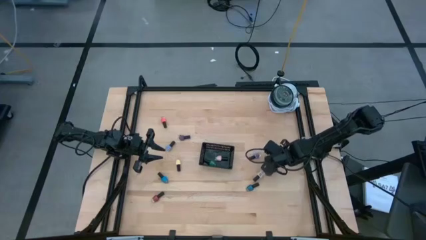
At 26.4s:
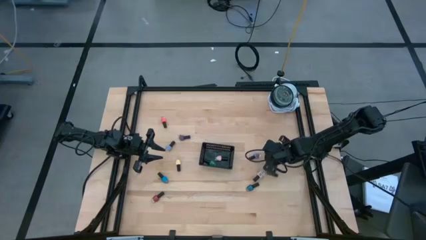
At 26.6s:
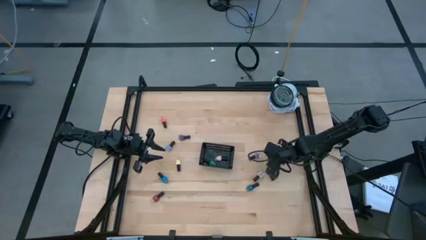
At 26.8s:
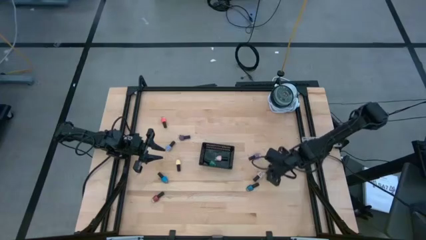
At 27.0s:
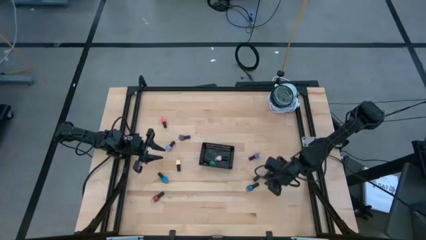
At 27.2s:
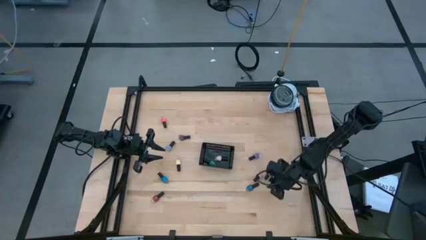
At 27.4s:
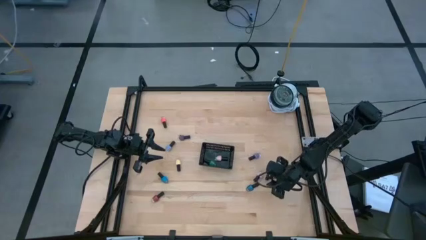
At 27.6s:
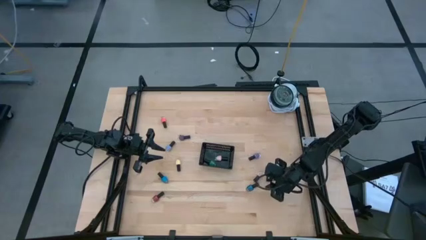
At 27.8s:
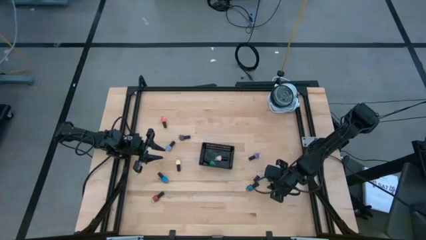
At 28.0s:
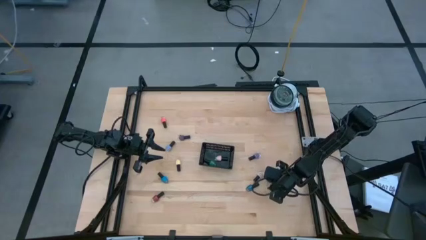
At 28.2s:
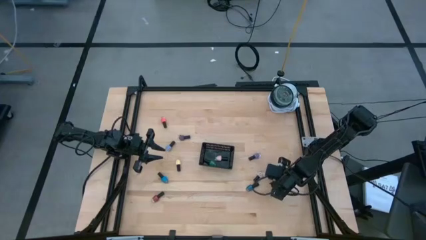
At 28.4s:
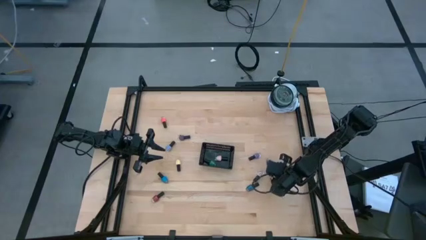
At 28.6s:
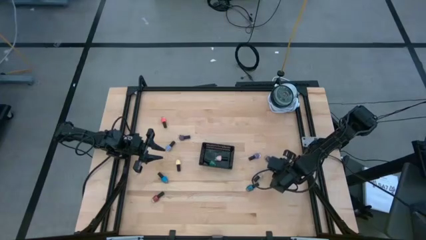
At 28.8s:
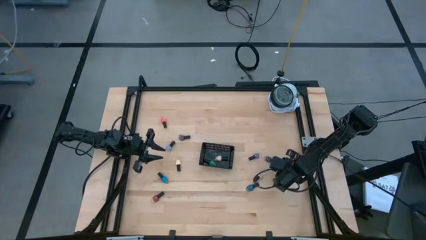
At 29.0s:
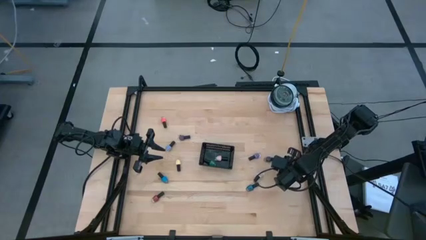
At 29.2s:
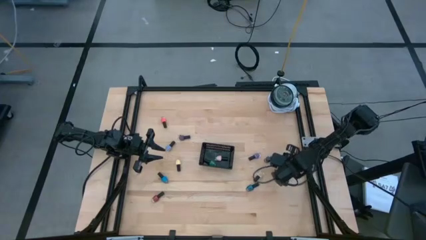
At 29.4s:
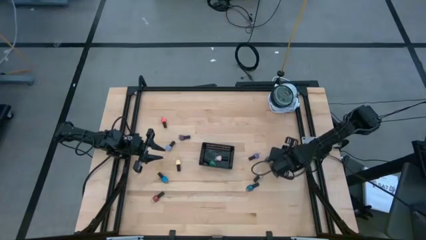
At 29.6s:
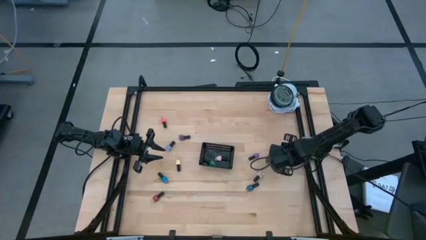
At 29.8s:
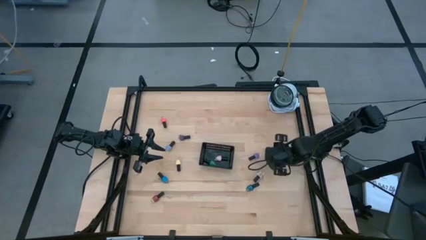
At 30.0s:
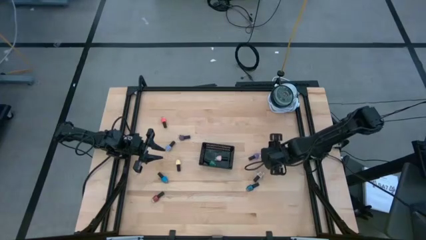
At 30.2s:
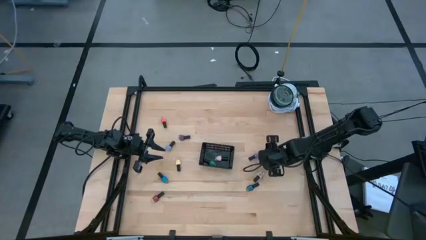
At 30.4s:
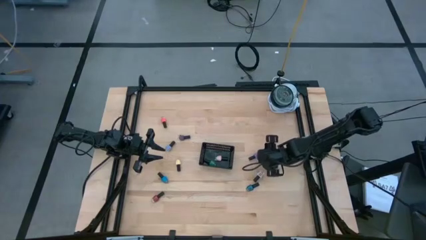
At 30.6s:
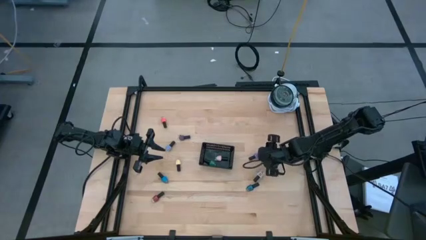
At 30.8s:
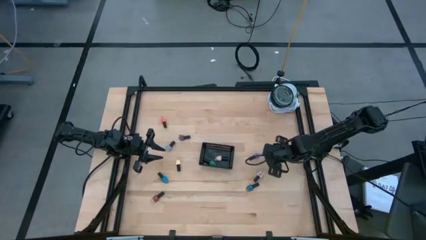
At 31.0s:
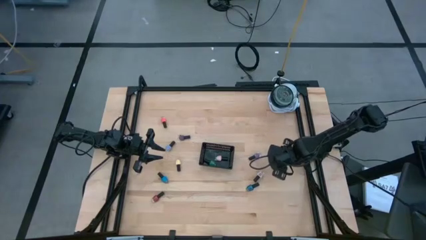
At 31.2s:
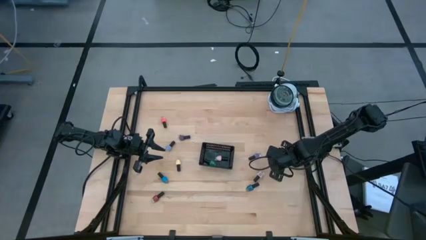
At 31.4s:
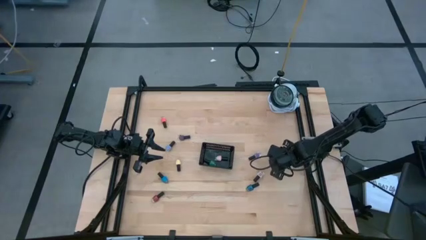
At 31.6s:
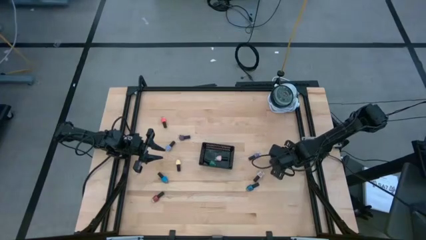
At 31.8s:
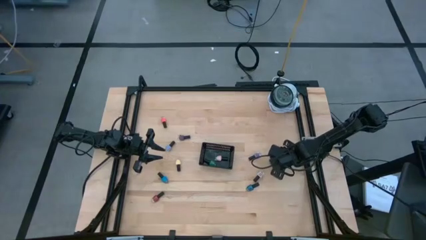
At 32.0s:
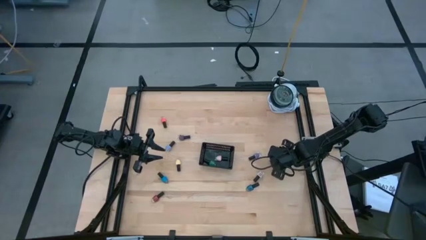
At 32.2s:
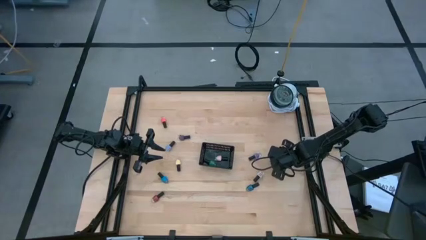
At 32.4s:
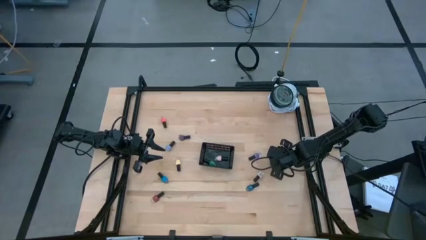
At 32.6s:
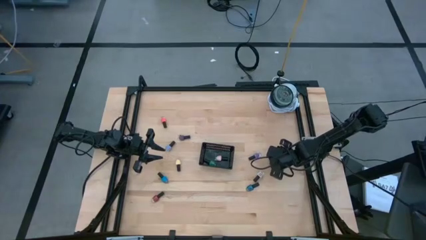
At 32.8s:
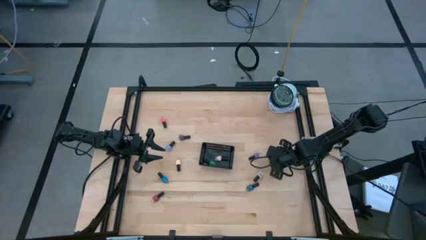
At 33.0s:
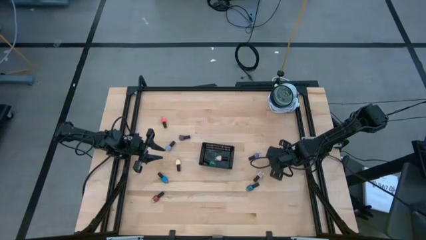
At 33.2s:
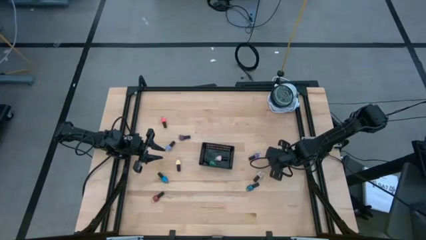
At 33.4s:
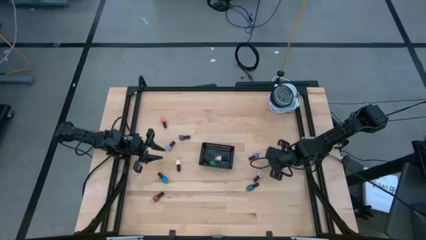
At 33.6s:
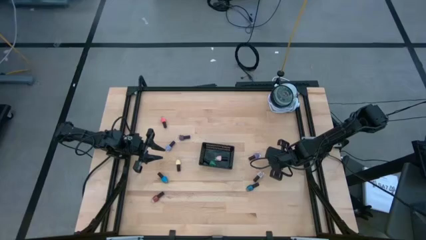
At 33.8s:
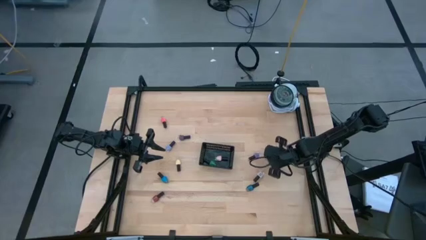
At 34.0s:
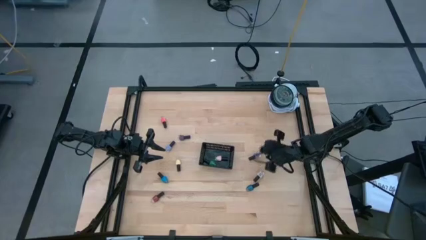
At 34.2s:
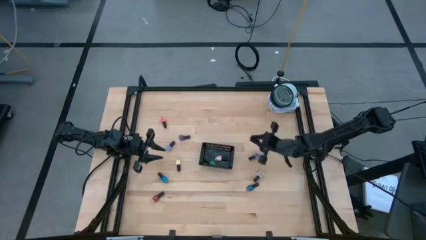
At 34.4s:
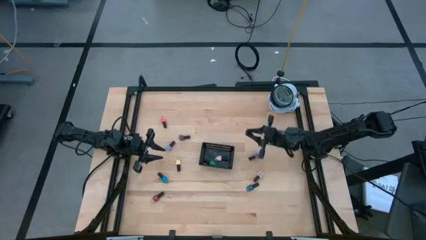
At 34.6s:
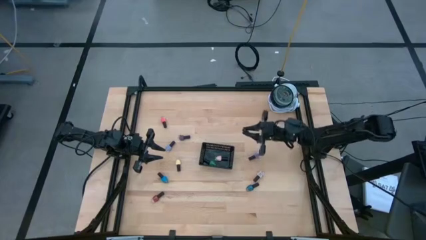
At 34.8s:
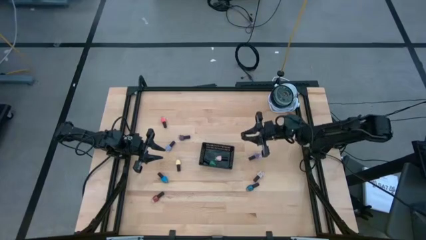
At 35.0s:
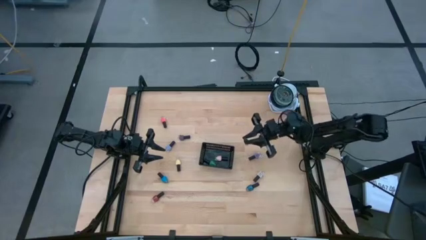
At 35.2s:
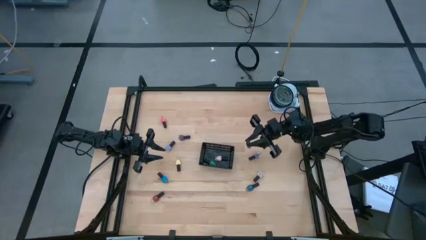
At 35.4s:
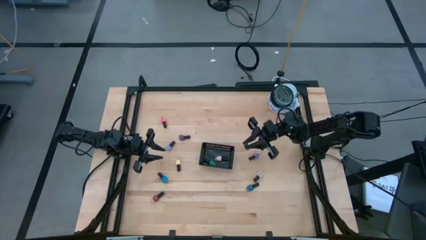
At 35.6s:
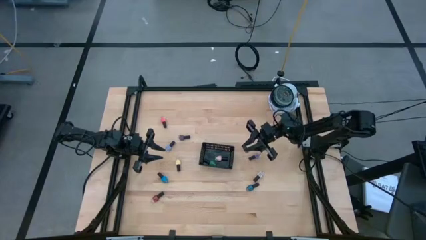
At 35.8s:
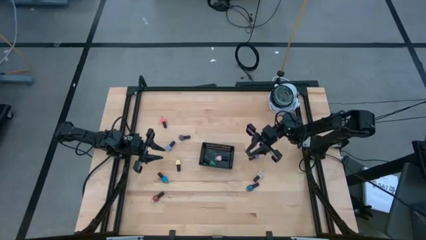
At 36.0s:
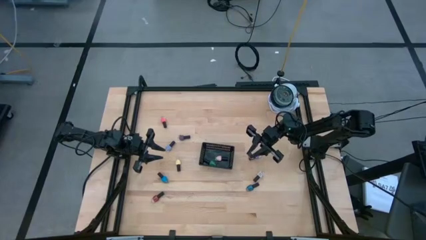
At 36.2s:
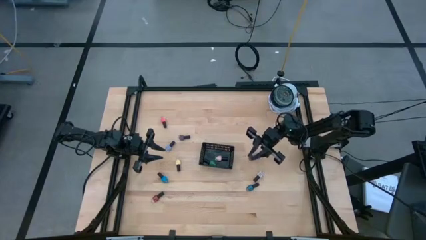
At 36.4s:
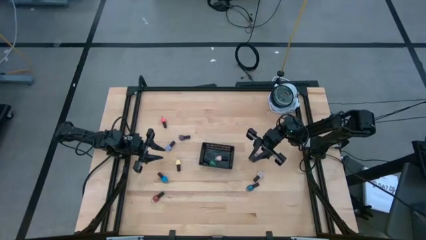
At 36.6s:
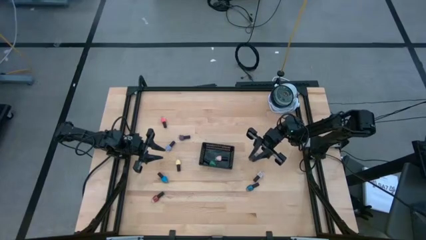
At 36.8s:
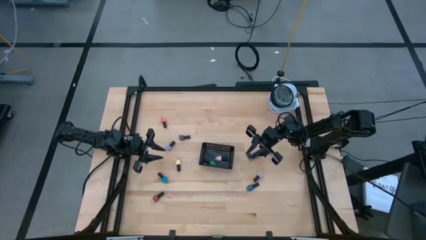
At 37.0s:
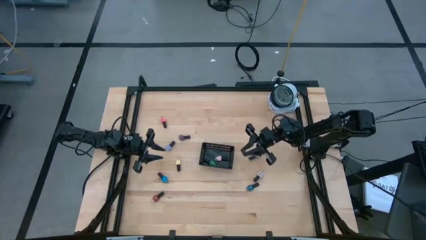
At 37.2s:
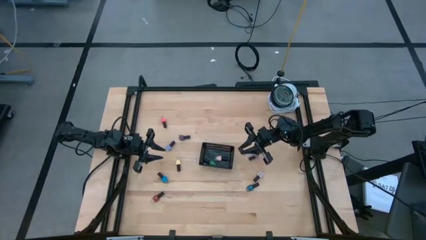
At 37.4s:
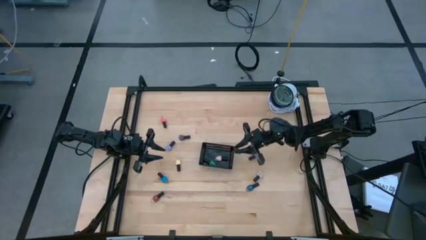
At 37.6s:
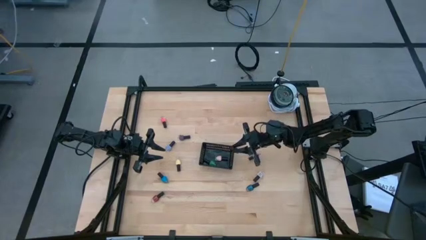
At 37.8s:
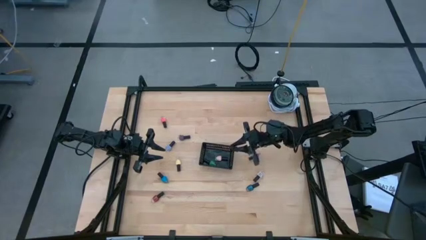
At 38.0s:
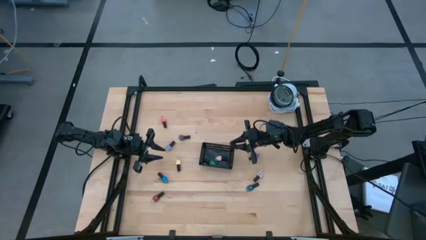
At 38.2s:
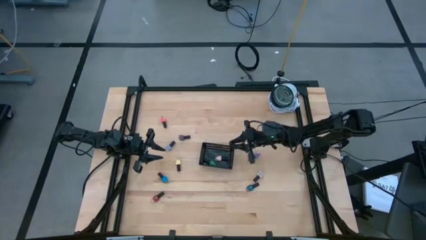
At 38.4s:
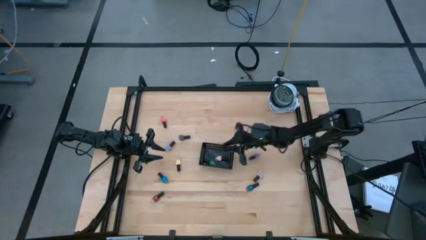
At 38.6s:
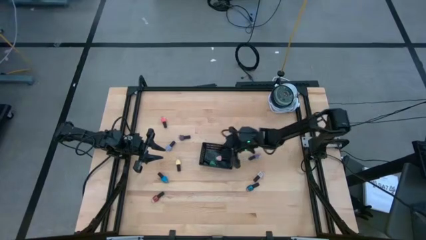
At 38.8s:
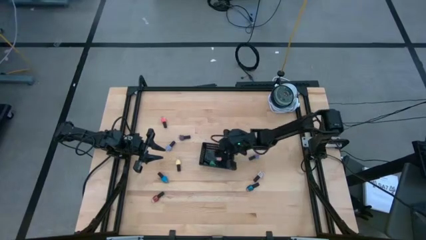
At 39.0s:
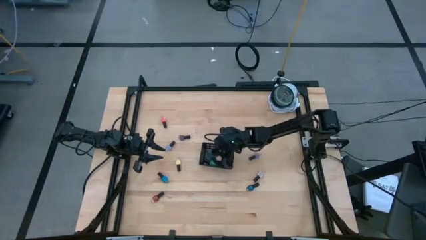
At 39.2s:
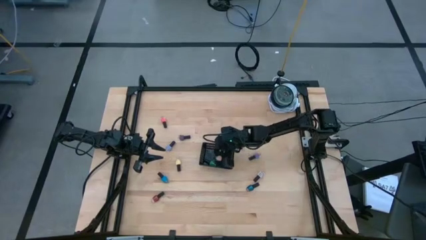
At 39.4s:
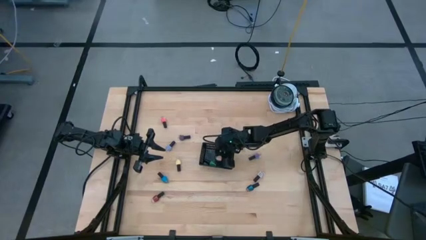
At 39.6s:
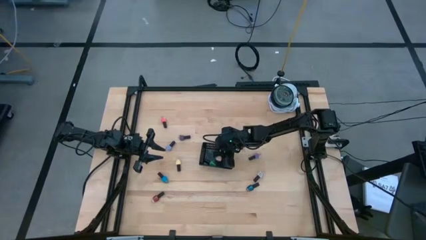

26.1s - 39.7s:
Task: Pick & Place Nail Polish
Put the dark green nail polish into the black bin

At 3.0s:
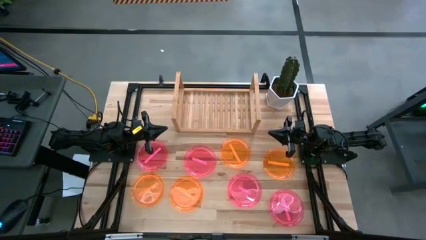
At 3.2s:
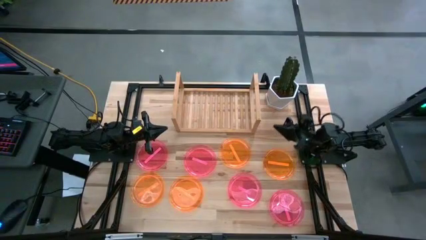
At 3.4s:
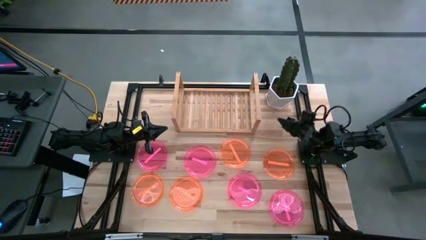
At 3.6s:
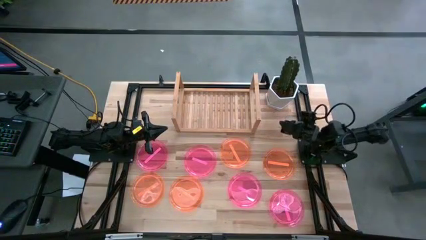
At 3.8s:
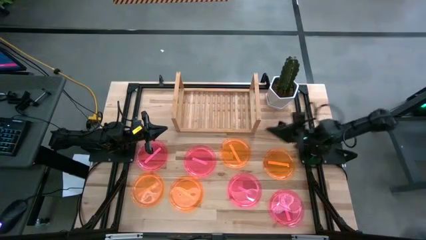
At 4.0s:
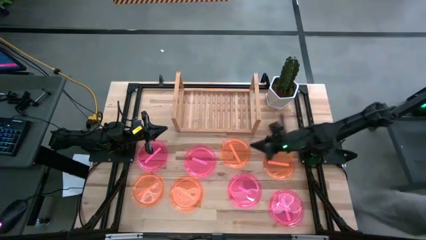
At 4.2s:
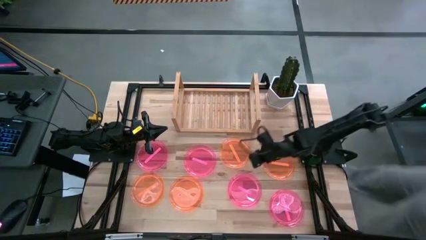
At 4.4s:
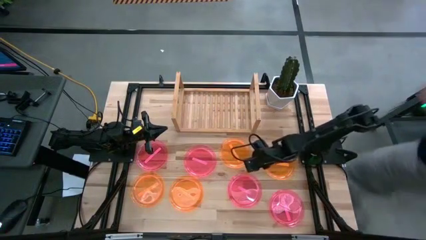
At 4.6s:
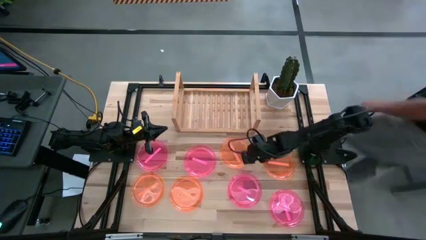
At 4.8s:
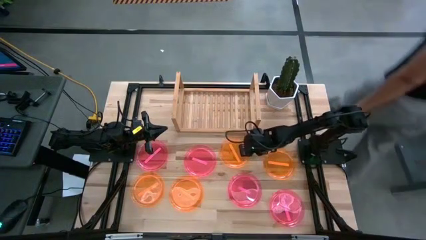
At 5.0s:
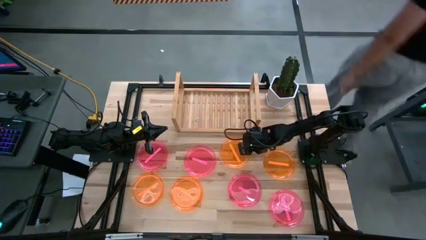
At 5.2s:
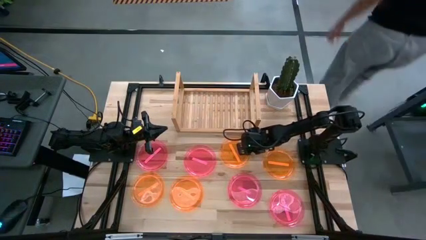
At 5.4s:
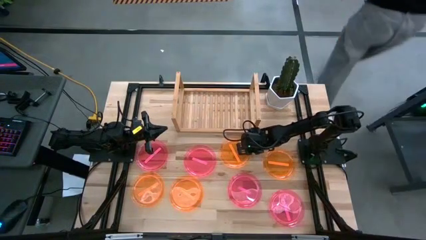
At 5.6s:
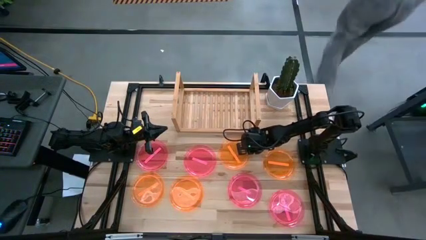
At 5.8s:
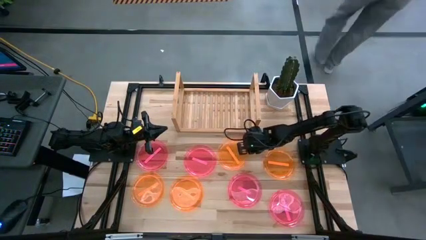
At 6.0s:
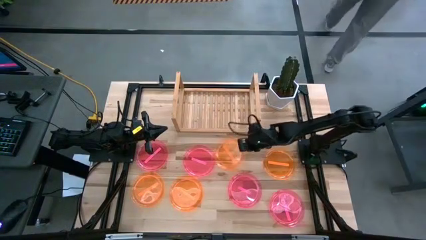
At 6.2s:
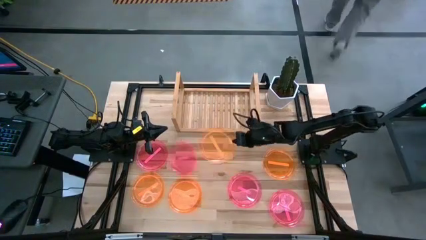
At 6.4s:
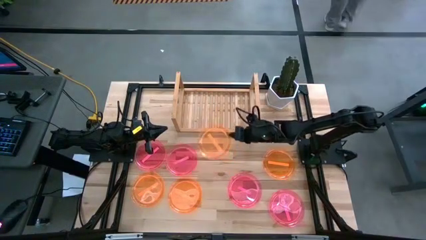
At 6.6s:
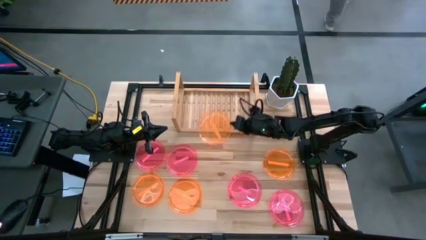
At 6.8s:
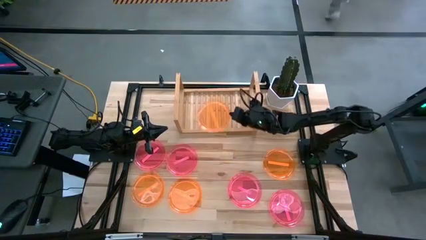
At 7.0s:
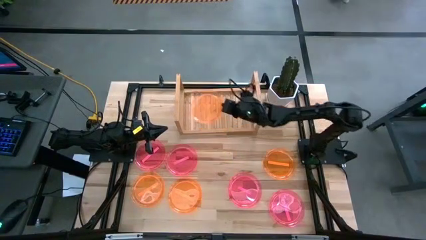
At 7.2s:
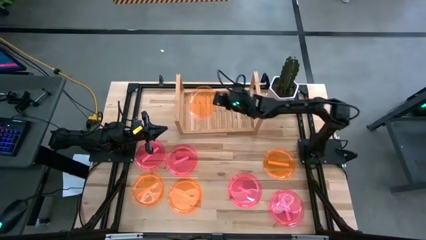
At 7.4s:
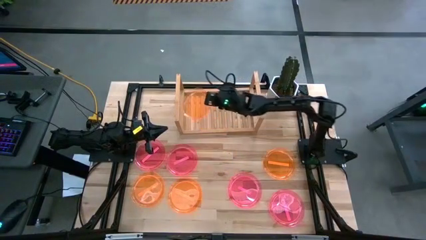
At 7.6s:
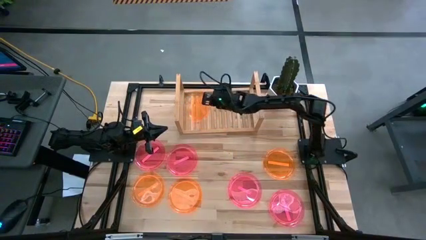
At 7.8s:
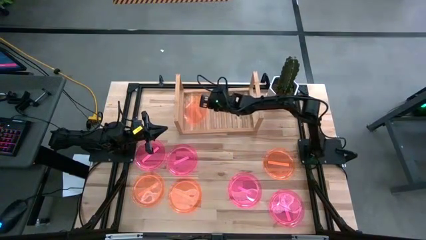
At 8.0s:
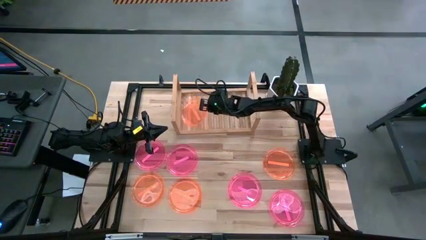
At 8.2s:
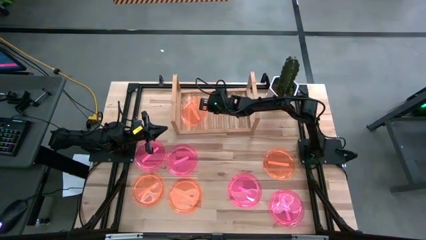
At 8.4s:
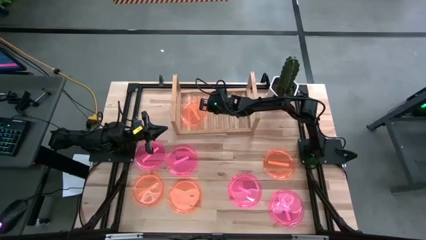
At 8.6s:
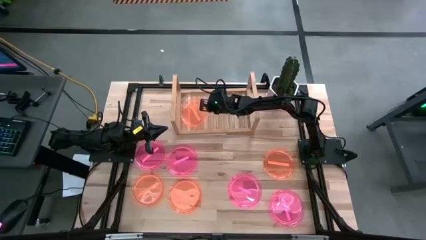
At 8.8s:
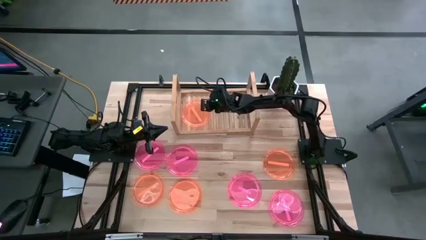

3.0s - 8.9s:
Task: Place and stack plates onto a shelf
Put the top center orange plate on the shelf
